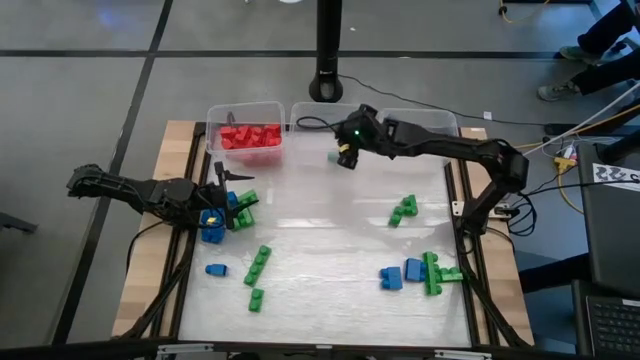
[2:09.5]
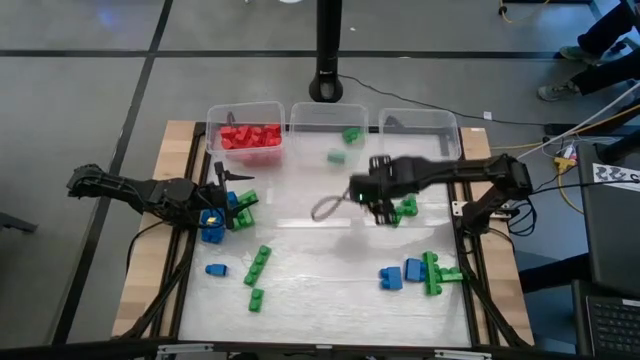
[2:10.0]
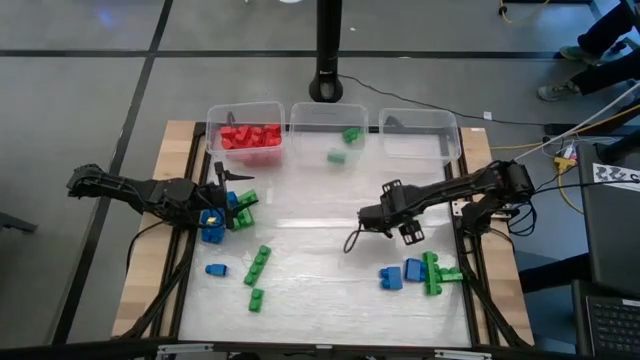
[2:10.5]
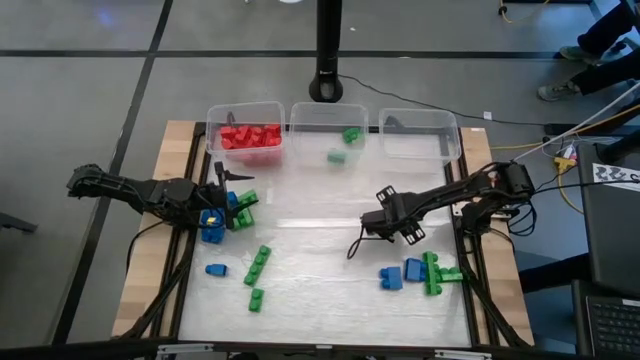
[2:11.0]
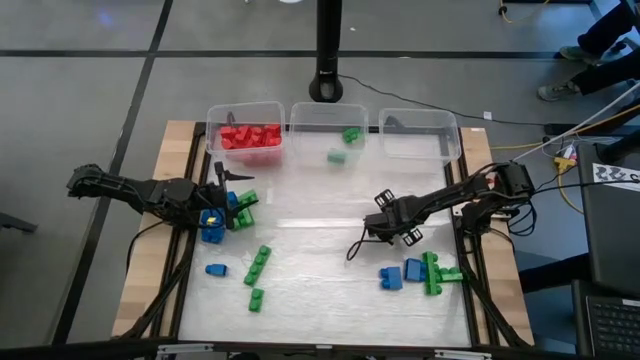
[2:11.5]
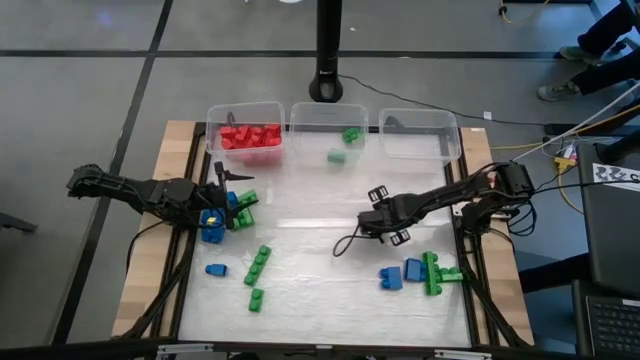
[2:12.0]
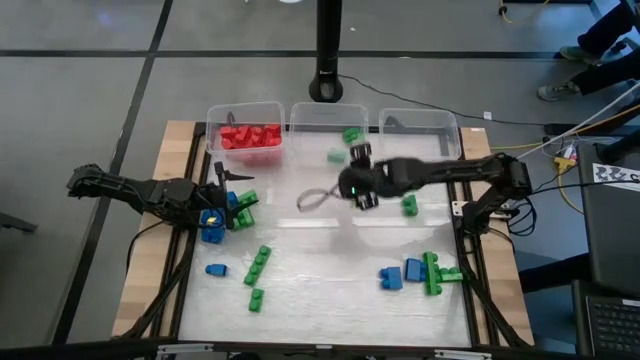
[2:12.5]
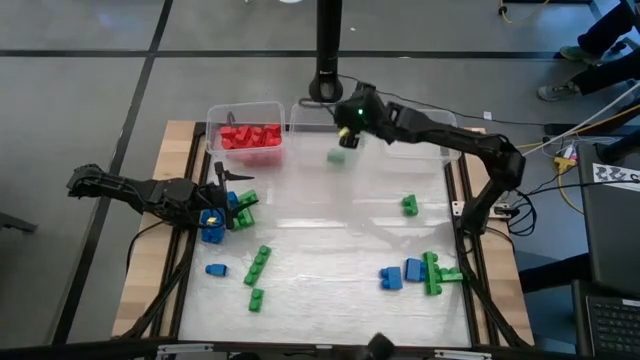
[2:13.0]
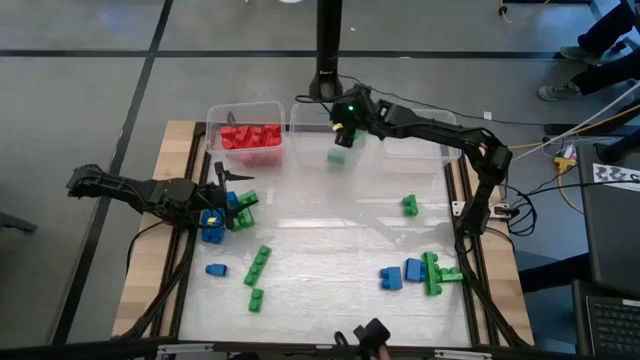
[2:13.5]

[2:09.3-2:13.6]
Task: Sort blocks
Put the green game piece into the middle transparent bin

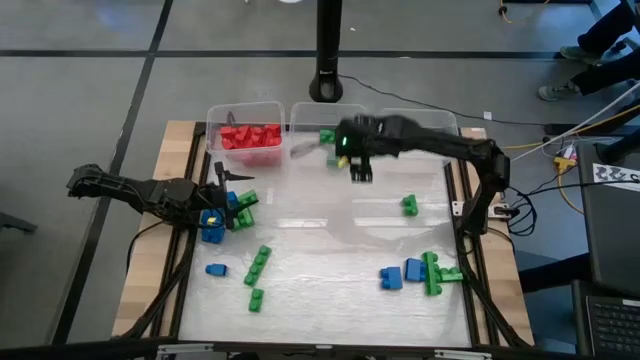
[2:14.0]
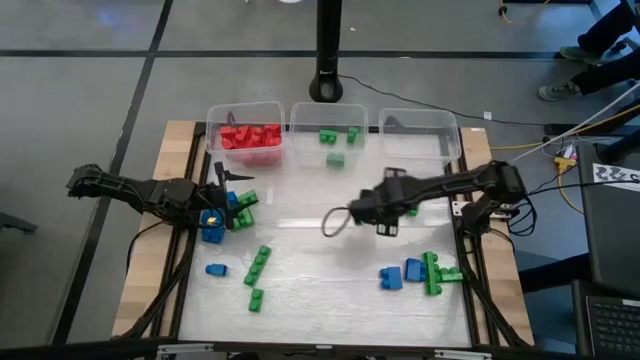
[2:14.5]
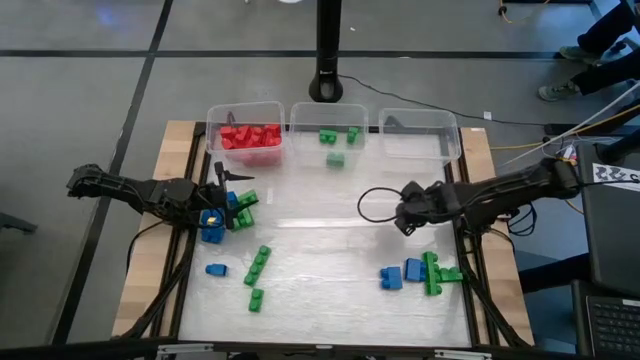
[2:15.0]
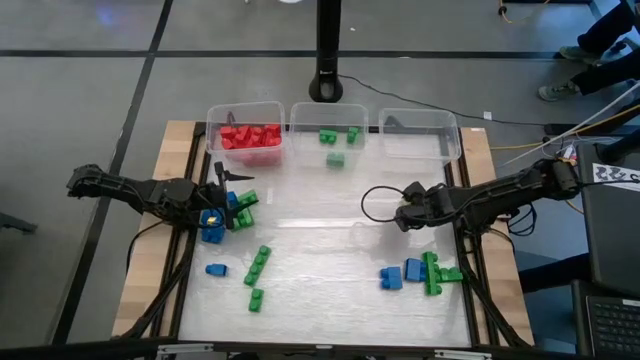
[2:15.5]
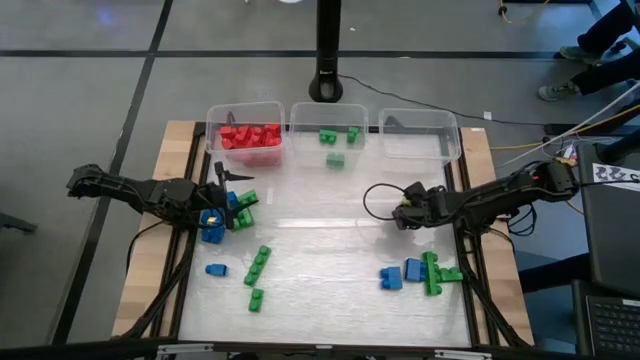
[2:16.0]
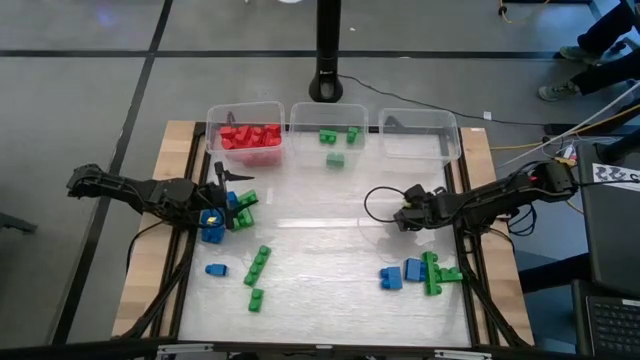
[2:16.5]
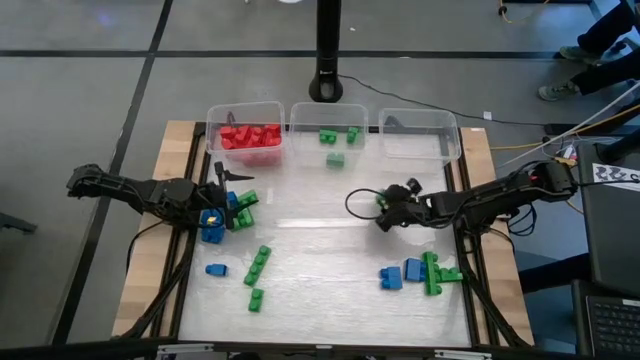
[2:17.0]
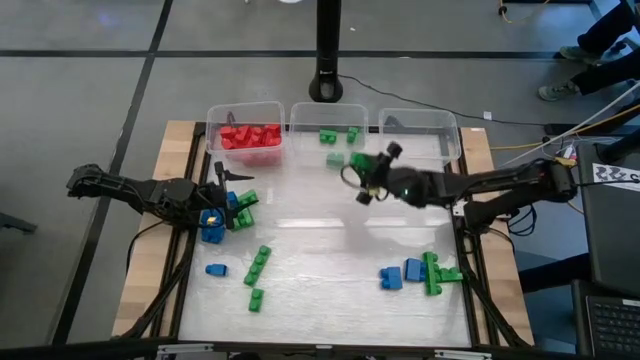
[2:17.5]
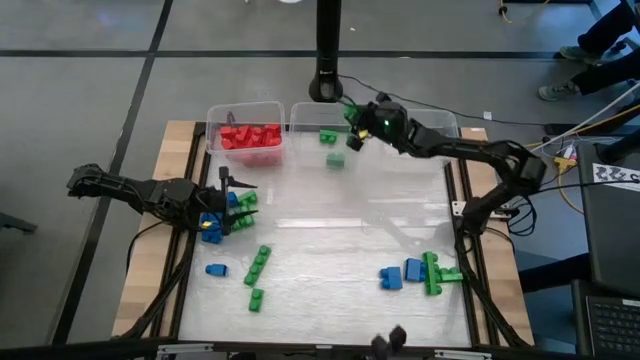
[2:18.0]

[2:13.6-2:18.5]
Put the green game piece into the middle transparent bin

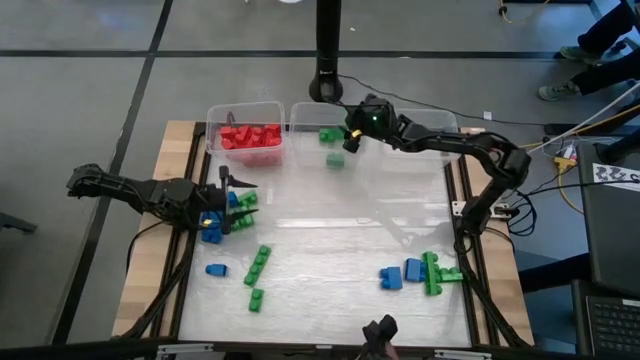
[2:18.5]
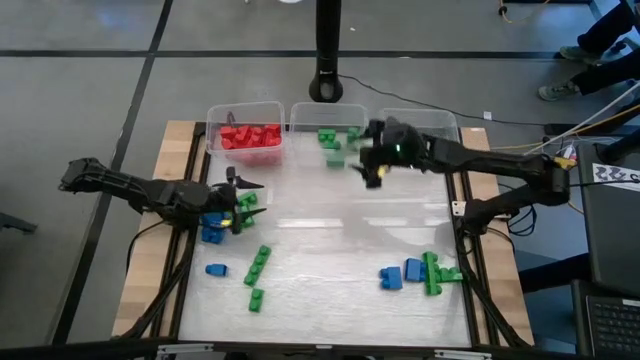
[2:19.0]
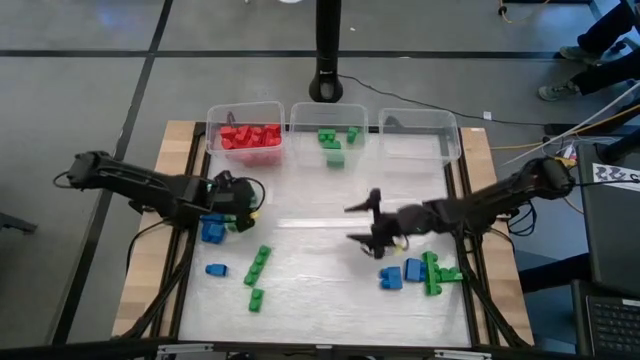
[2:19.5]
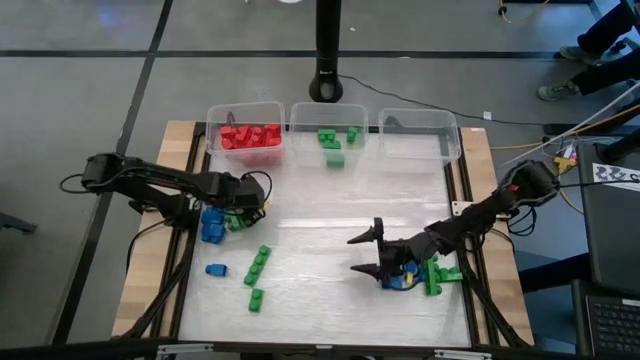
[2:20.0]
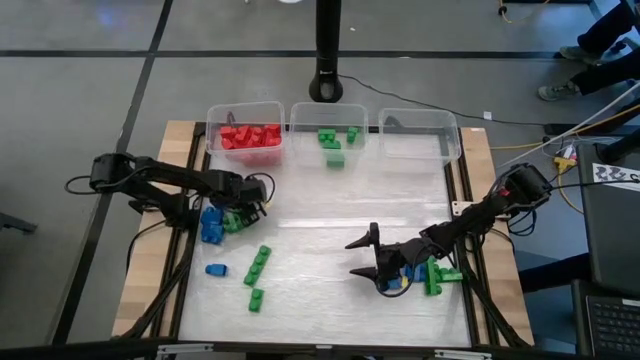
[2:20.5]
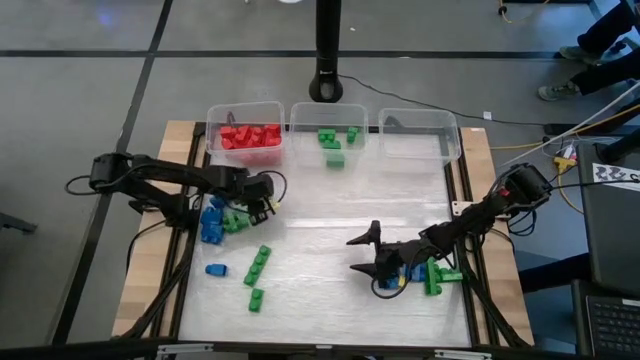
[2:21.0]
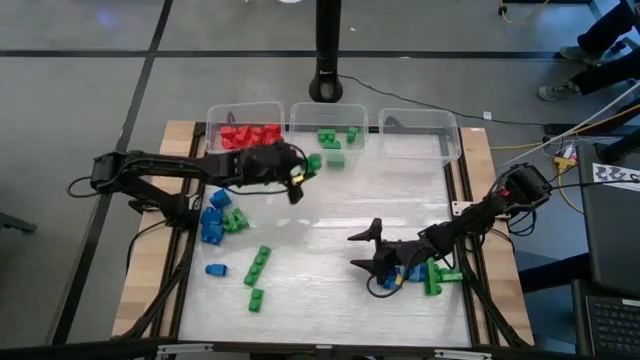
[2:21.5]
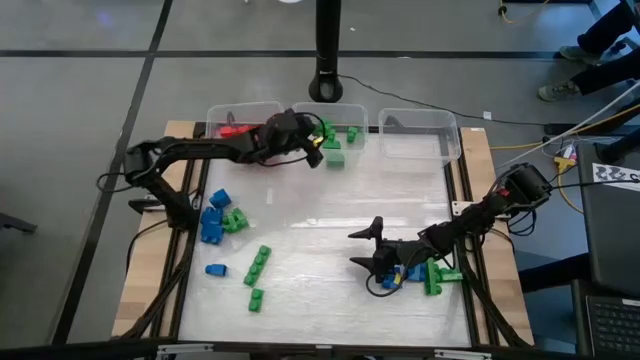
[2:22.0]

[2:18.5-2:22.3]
Put the green game piece into the middle transparent bin

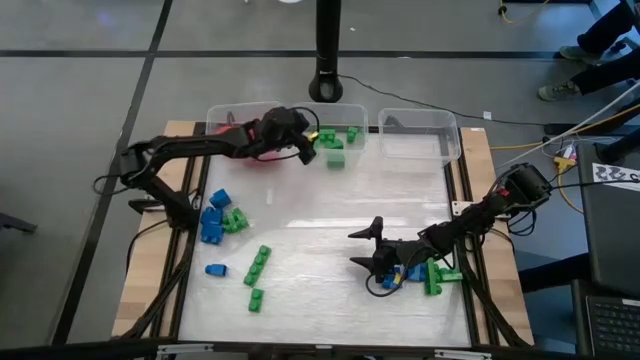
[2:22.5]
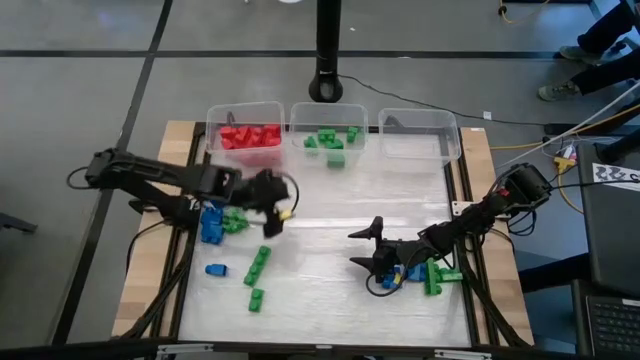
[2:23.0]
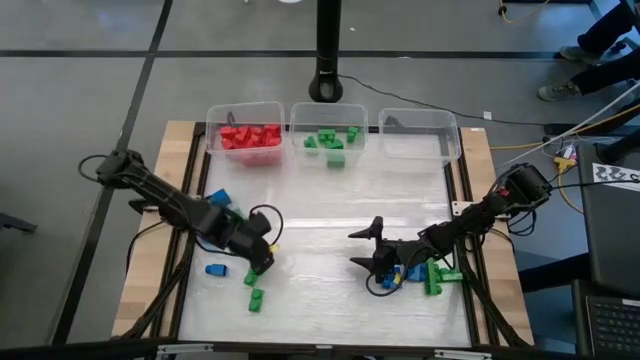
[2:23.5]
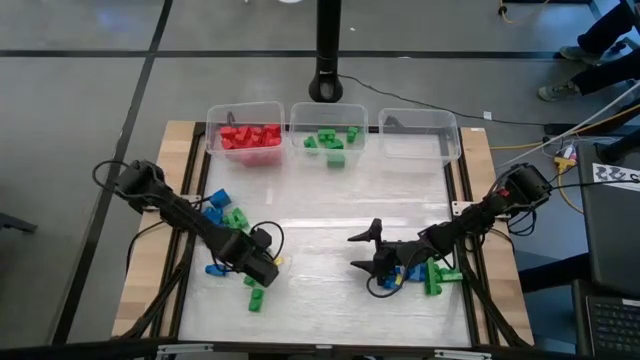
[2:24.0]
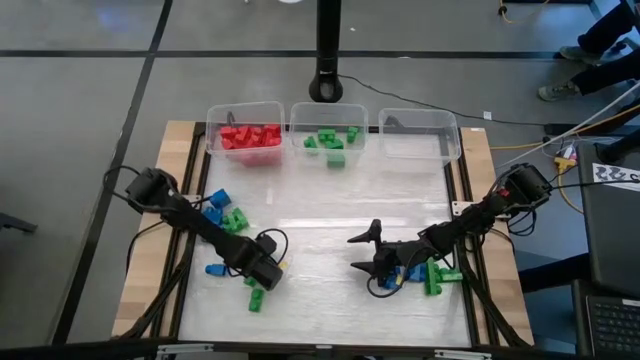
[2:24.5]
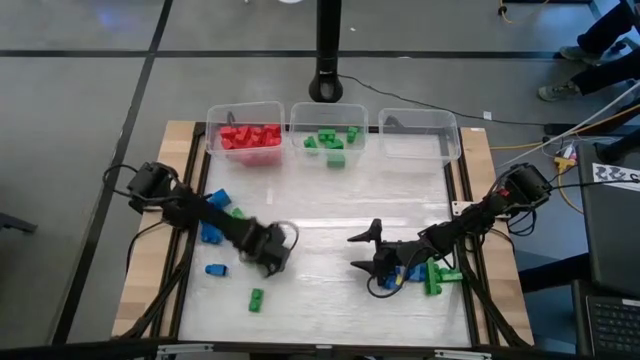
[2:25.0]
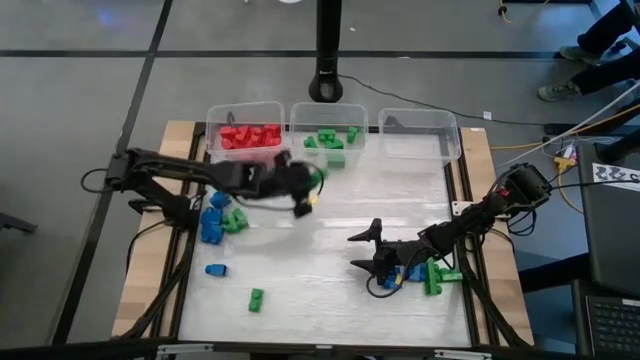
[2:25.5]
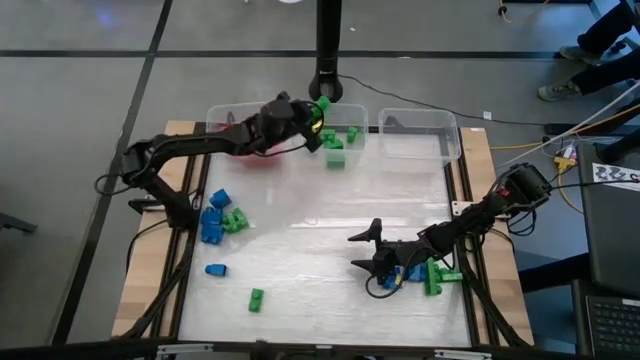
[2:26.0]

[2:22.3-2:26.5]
Put the green game piece into the middle transparent bin

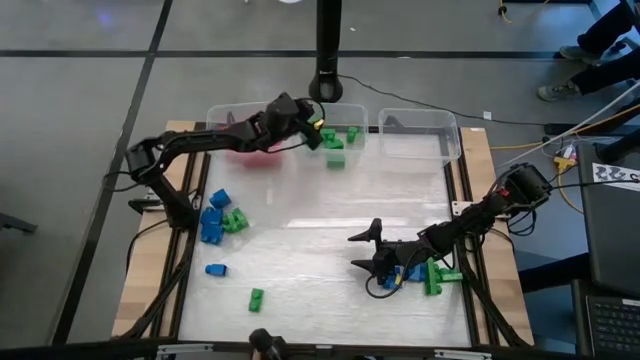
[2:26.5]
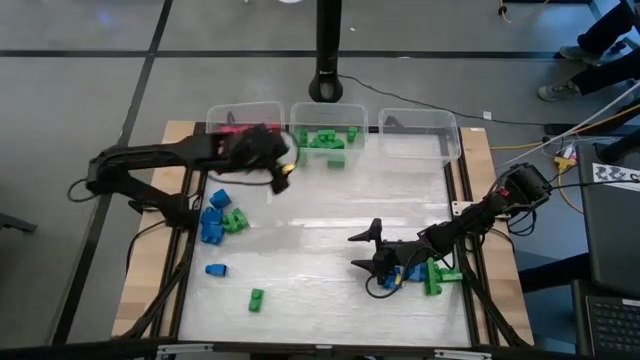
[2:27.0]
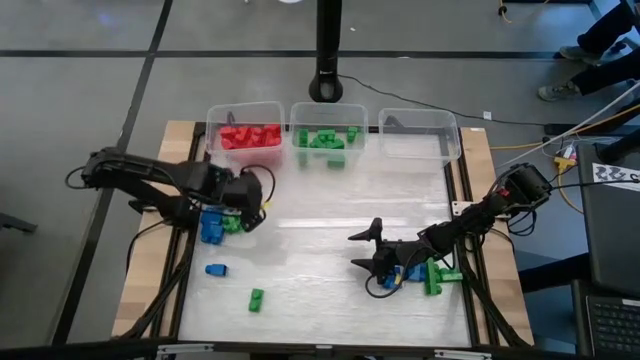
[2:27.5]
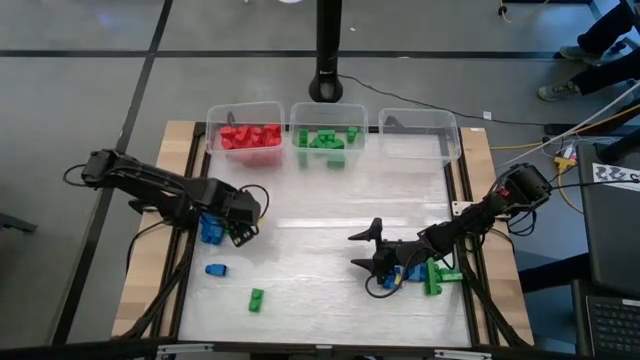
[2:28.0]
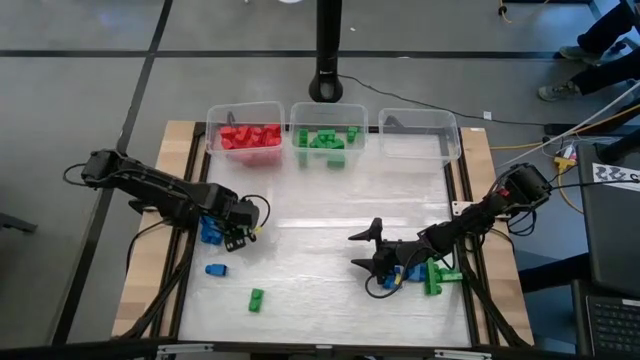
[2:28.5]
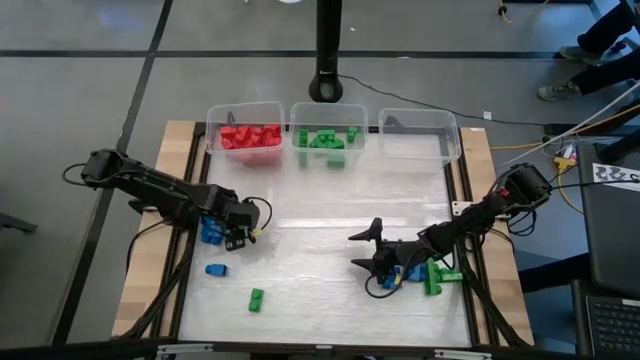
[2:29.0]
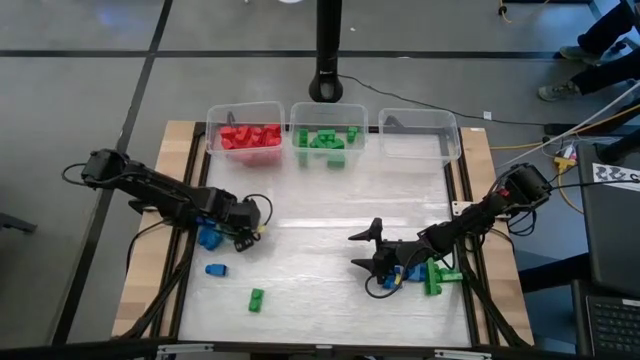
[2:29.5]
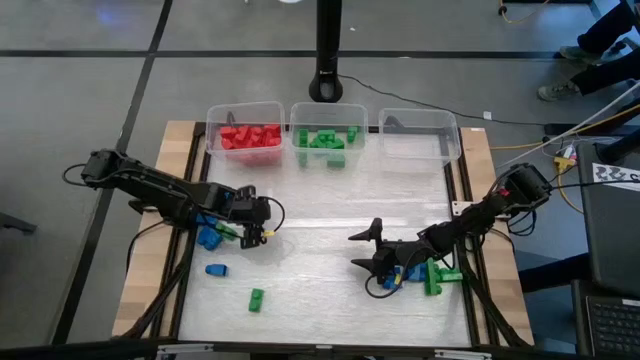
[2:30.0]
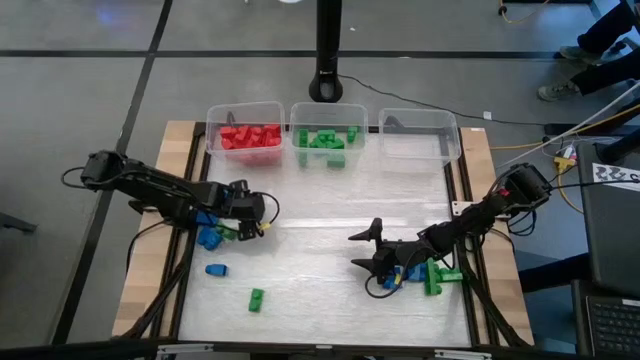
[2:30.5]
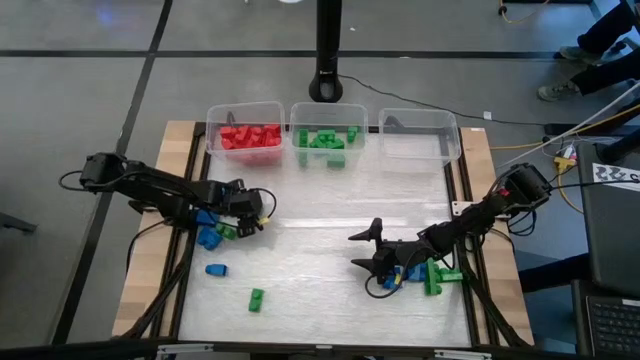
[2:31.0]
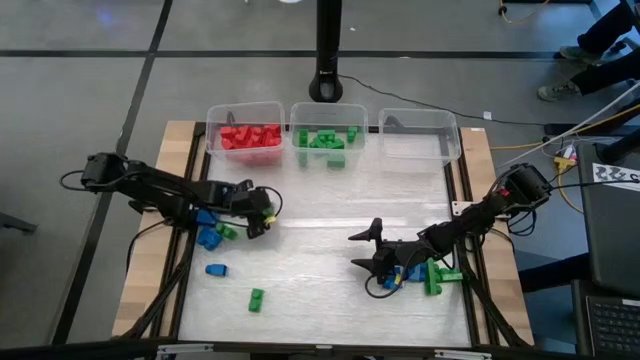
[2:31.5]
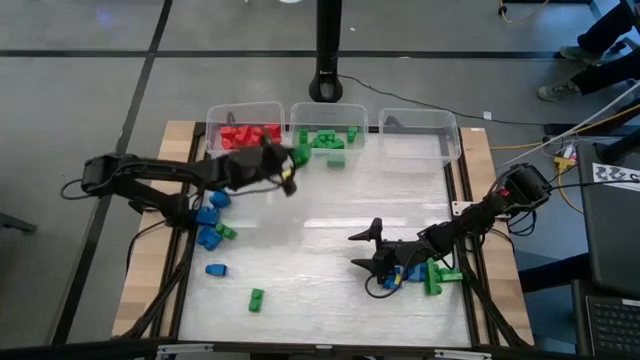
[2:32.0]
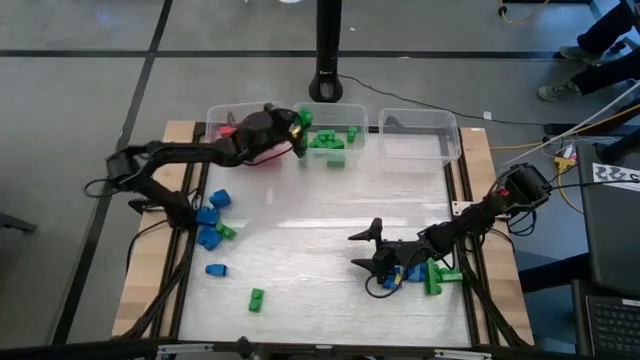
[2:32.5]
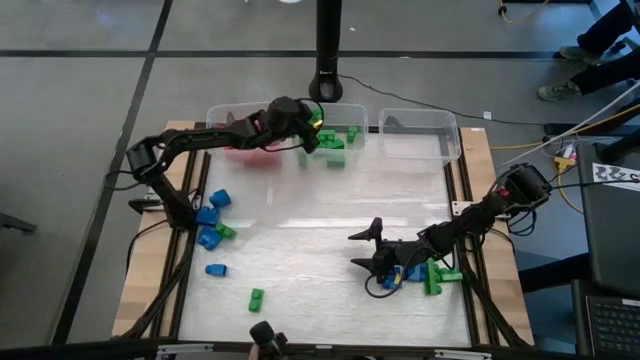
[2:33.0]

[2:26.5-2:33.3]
Put the green game piece into the middle transparent bin
